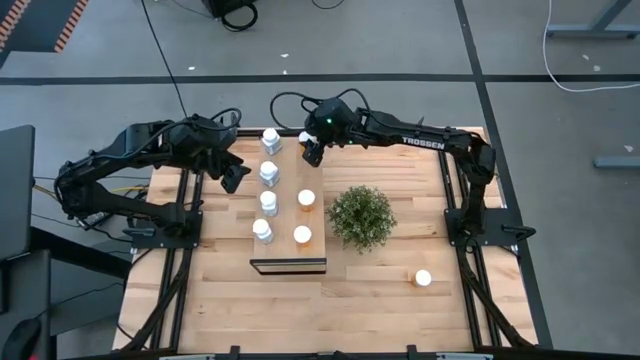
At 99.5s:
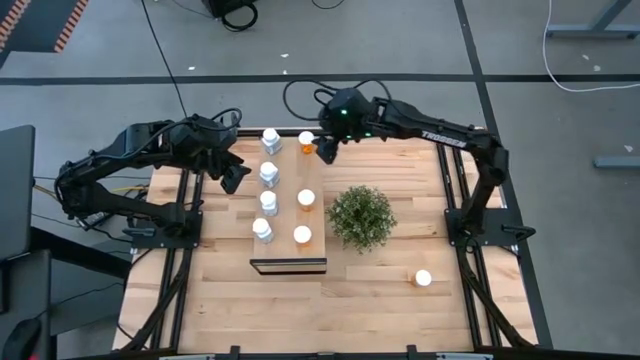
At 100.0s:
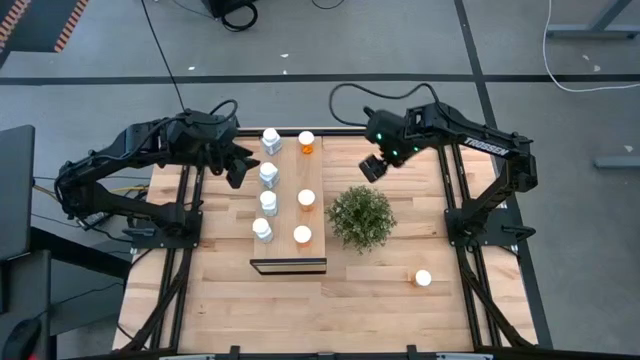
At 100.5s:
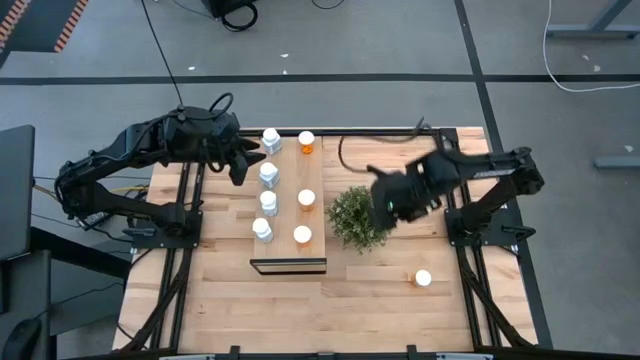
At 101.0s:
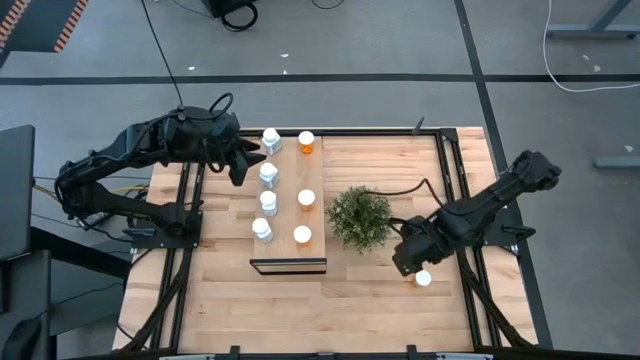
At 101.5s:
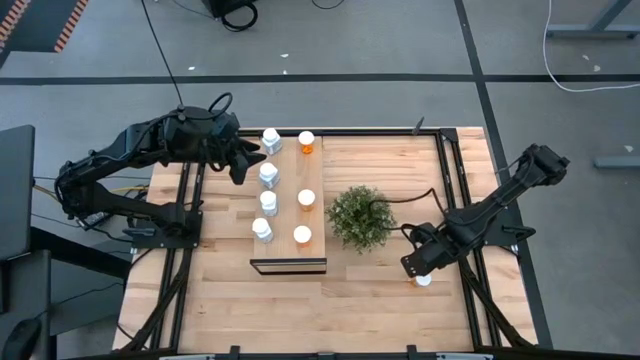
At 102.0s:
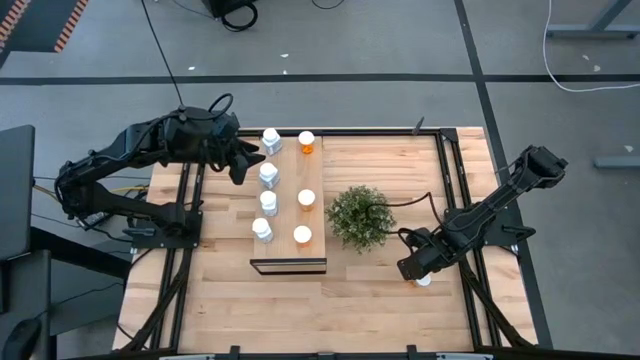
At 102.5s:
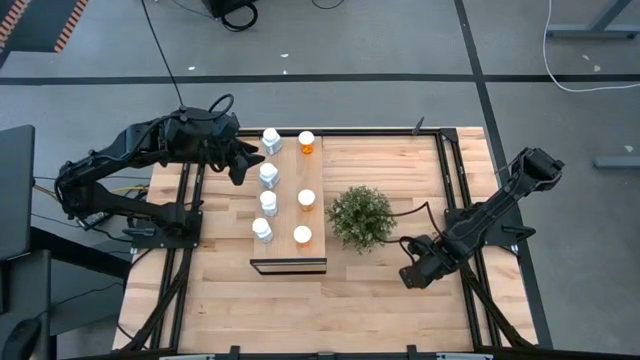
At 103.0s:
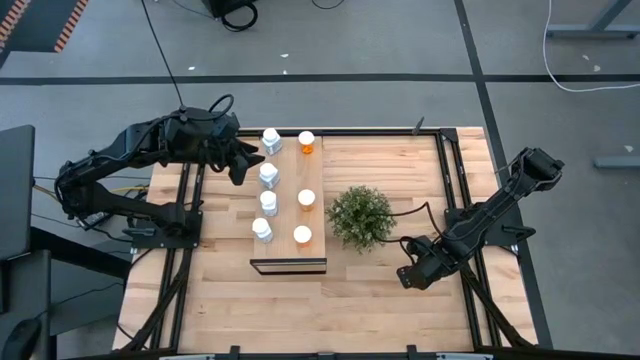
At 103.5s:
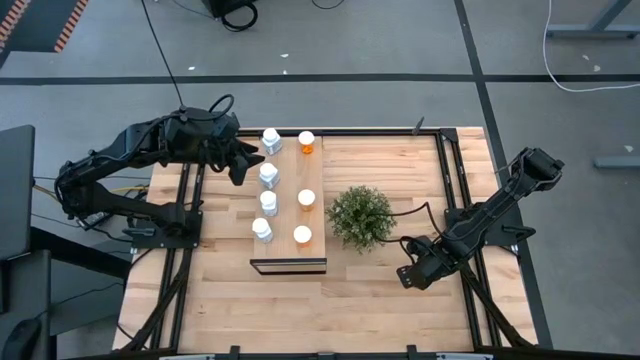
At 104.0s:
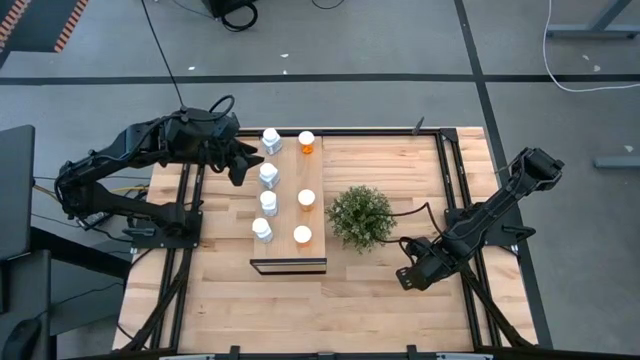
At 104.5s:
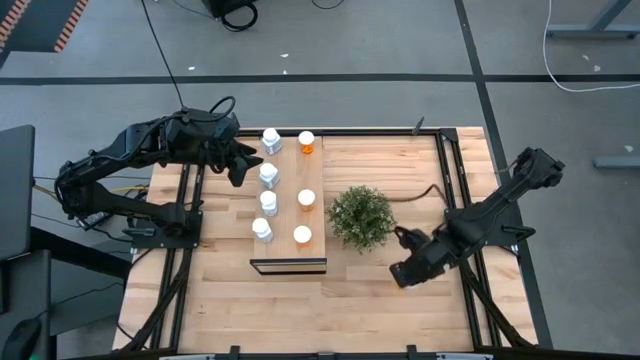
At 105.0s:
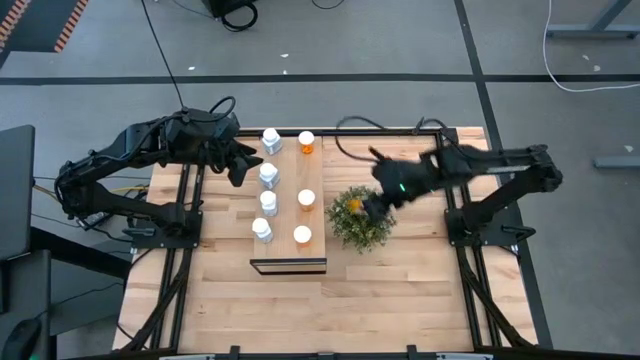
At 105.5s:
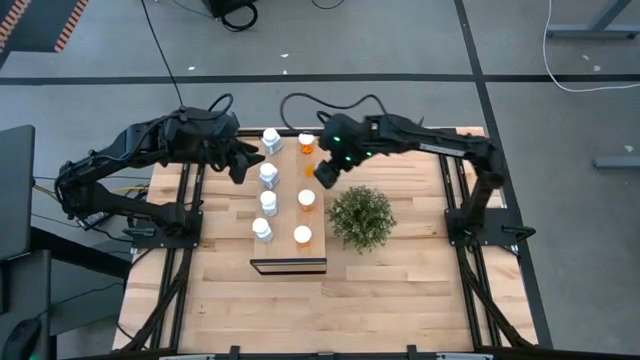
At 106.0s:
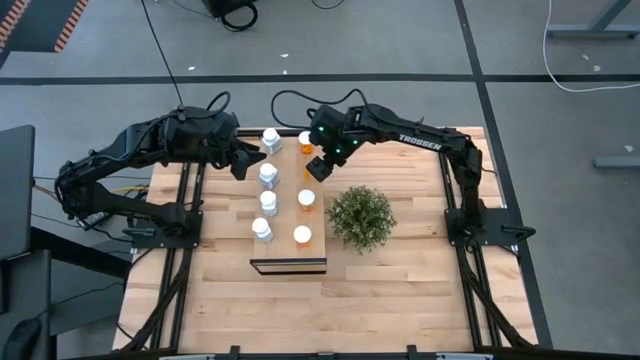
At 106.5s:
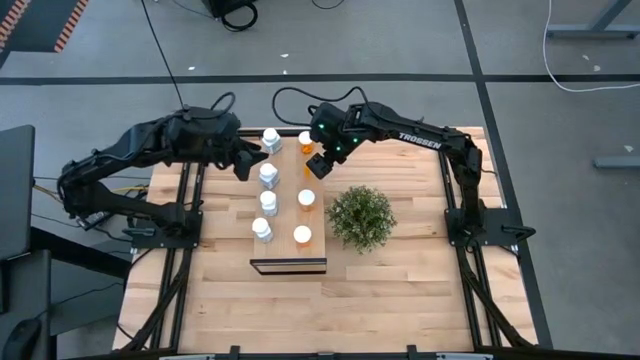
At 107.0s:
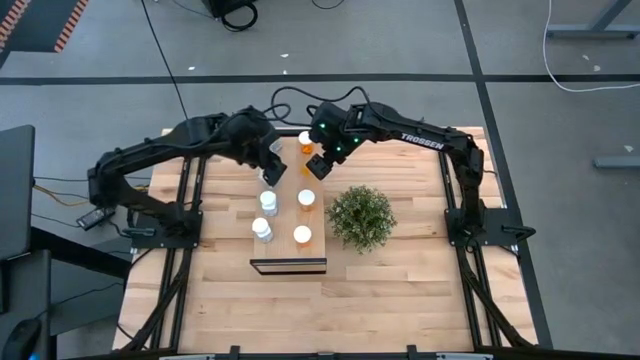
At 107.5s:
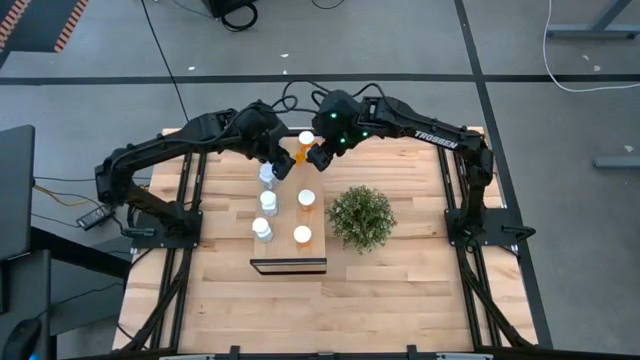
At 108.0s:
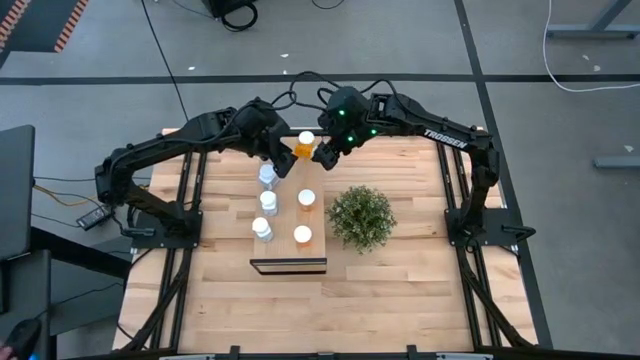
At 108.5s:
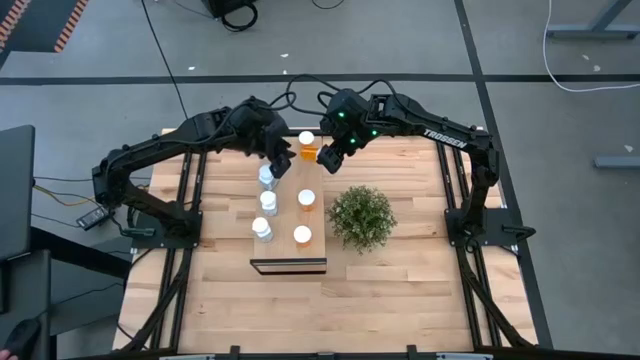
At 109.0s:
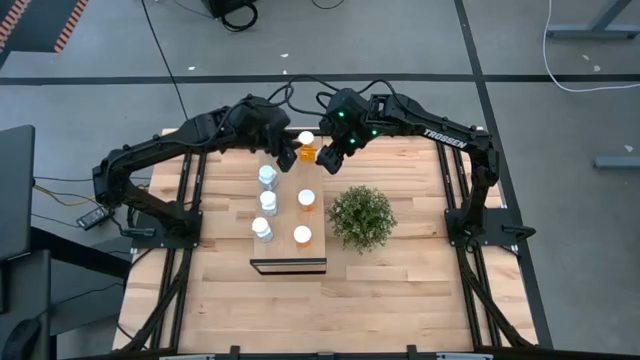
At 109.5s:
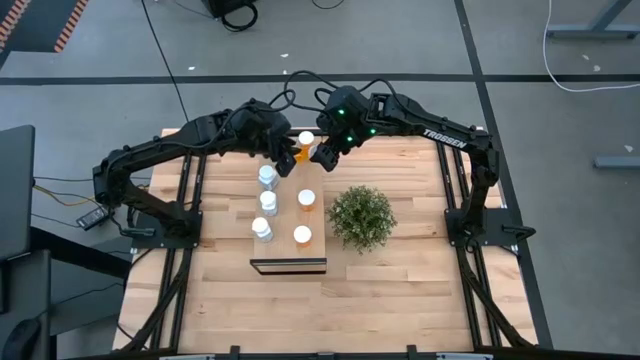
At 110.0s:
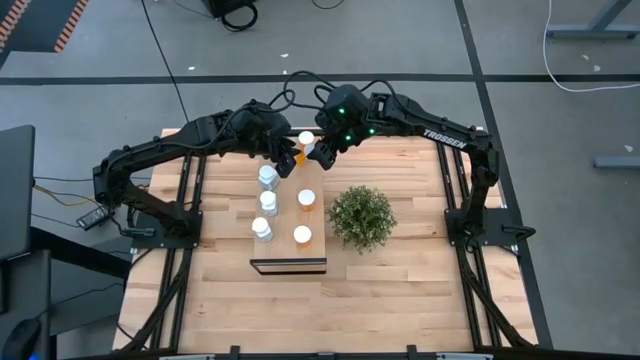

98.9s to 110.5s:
Task: Pick and place medicine bottles onto shelf by color
Put the orange pill bottle on the shelf aligned with the other orange pill bottles

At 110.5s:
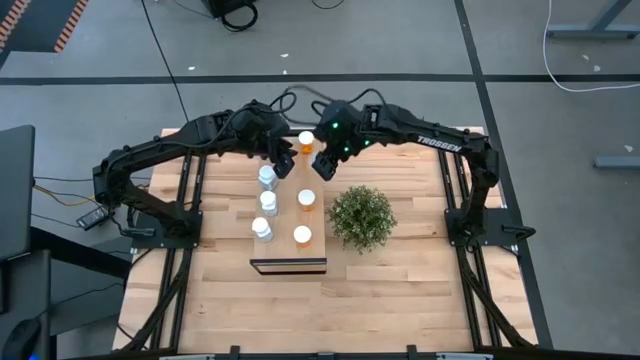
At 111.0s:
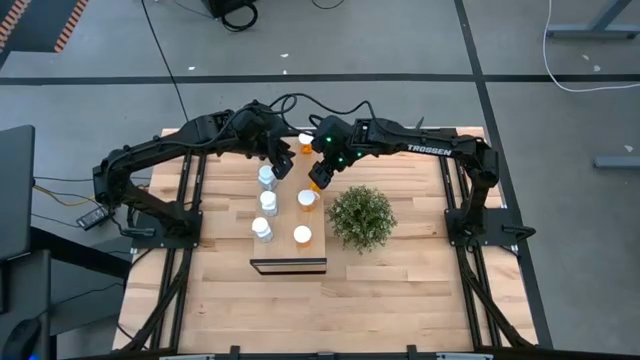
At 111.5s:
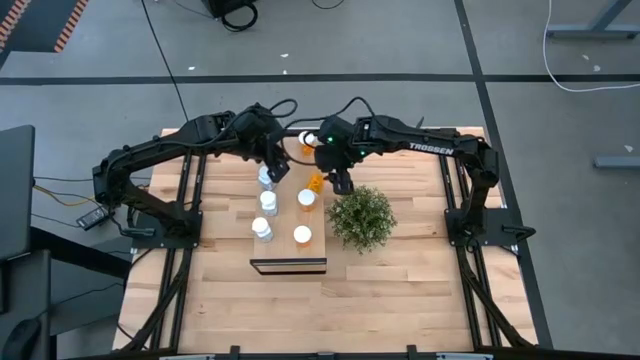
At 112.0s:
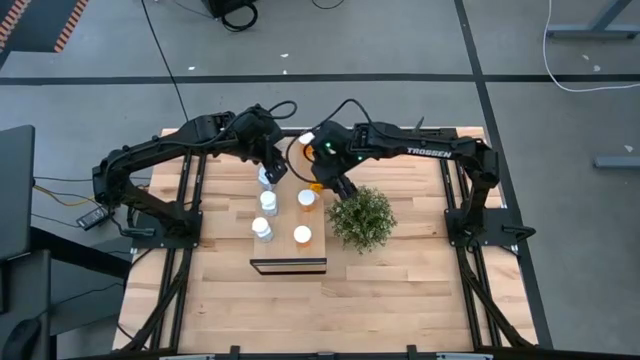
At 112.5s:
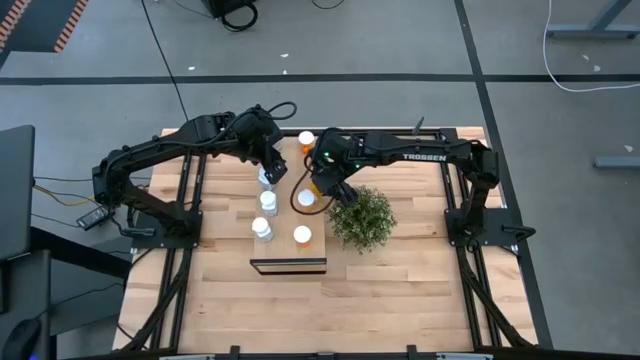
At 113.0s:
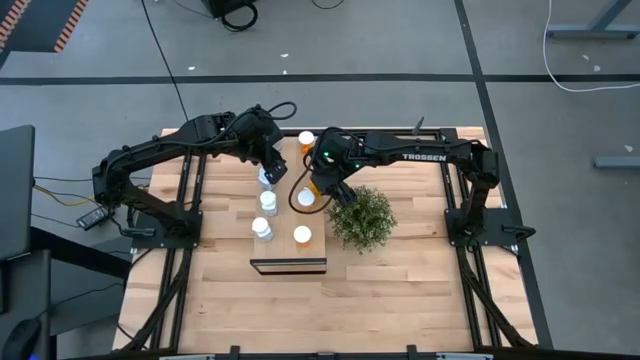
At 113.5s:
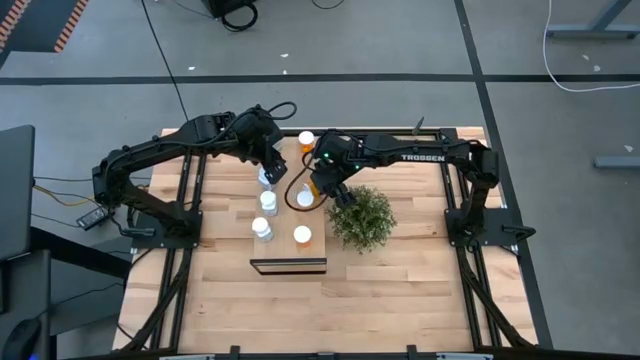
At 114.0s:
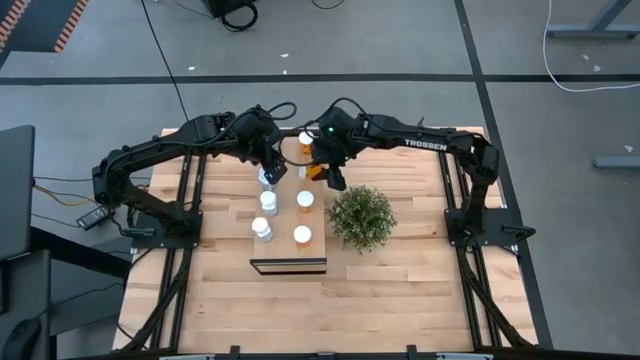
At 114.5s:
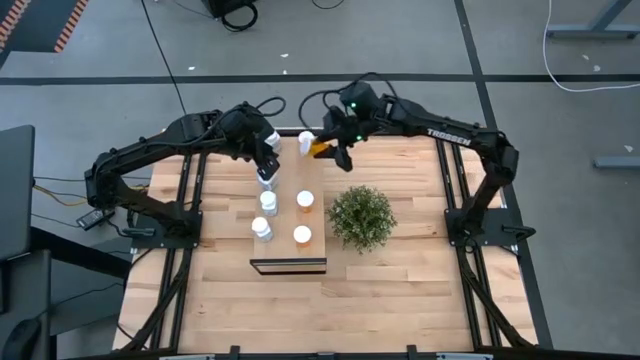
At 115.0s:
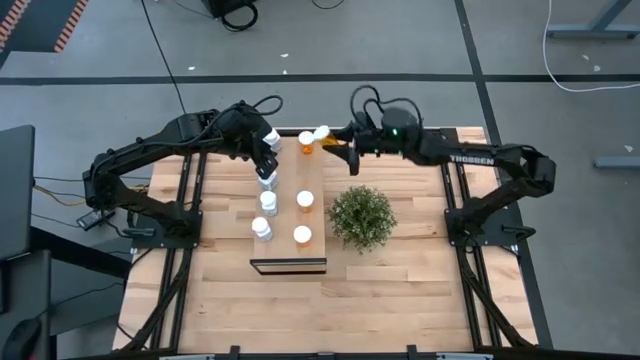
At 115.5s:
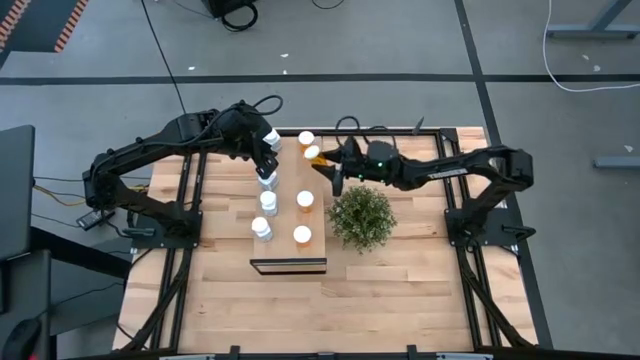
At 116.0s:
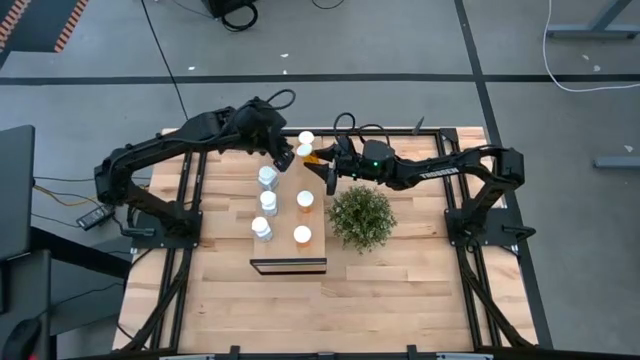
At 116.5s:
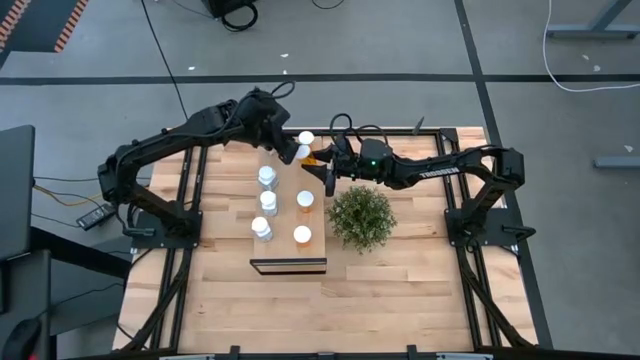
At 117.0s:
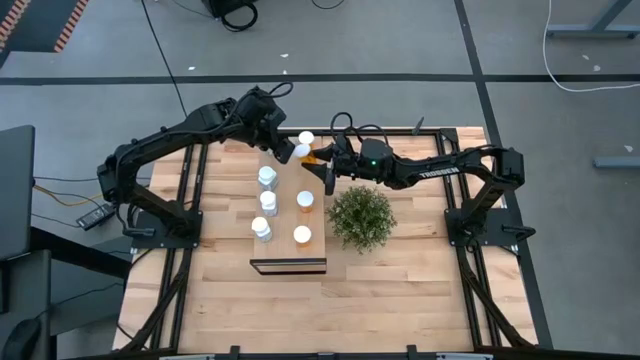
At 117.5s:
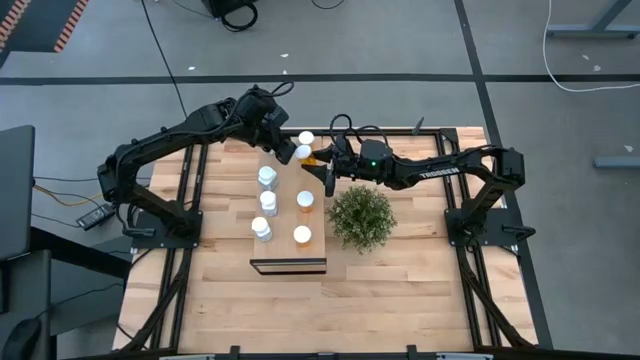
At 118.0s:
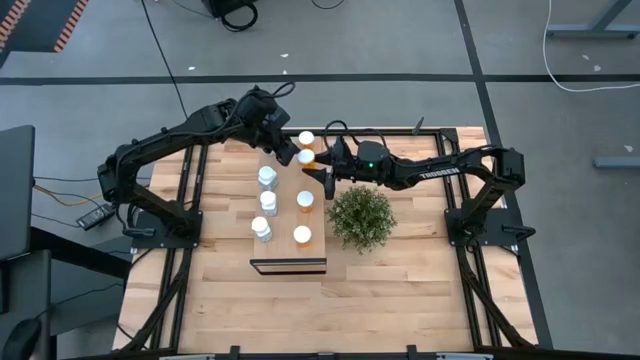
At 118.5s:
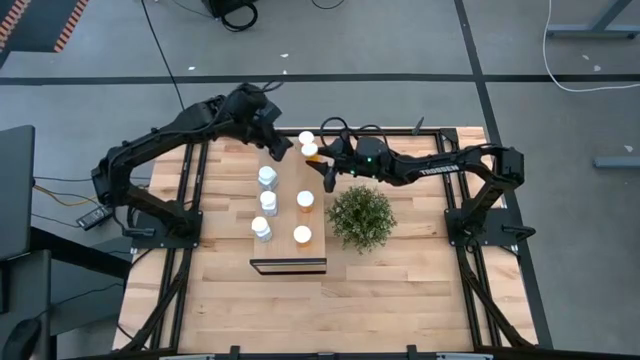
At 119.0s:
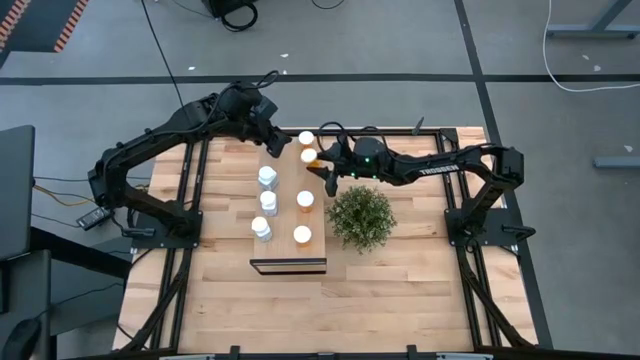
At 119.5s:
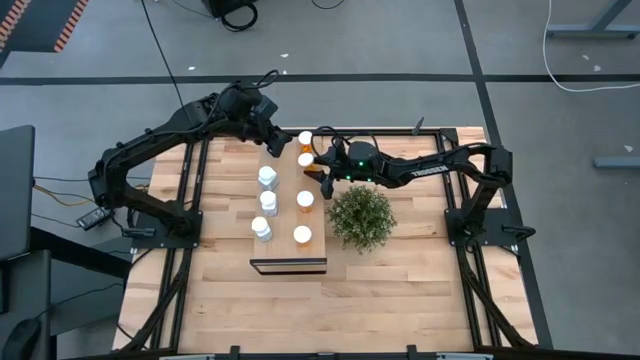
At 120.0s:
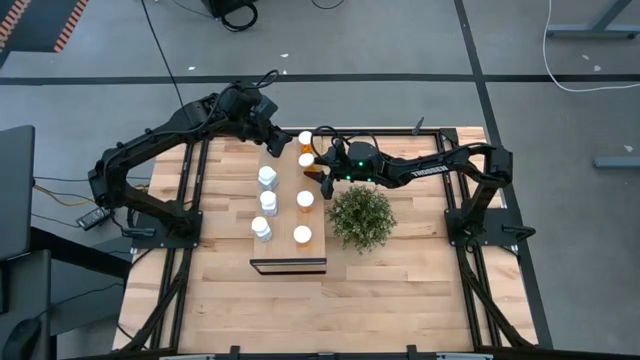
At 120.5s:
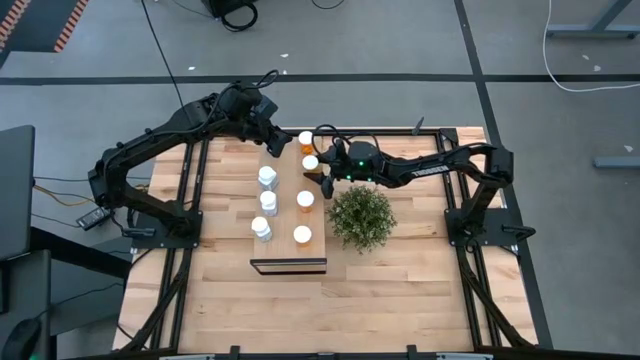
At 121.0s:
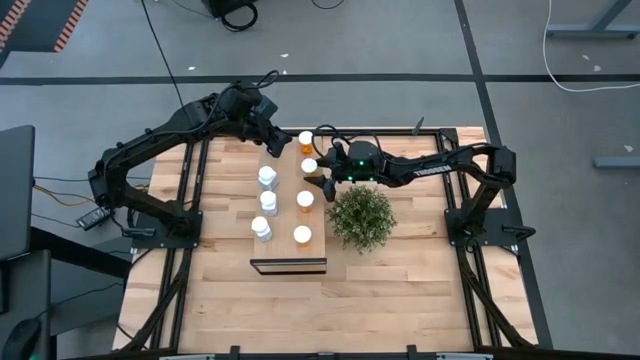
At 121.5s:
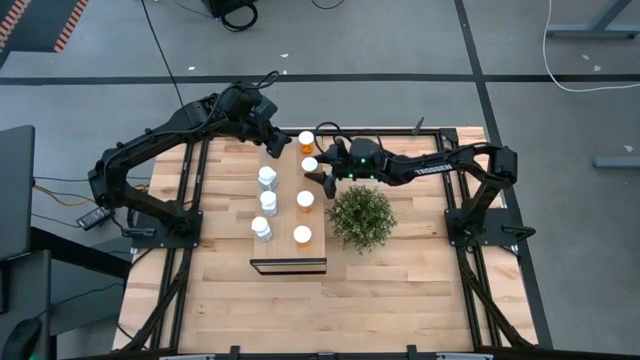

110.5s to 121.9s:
Put the orange pill bottle on the shelf aligned with the other orange pill bottle
